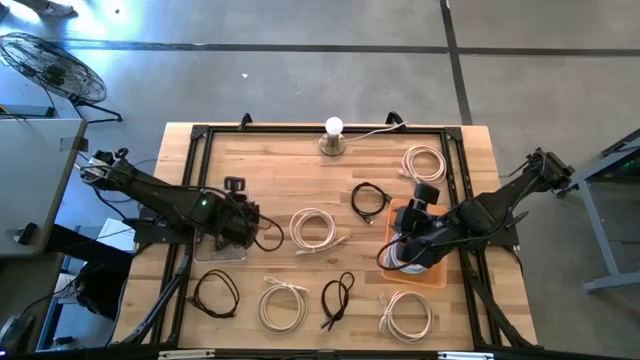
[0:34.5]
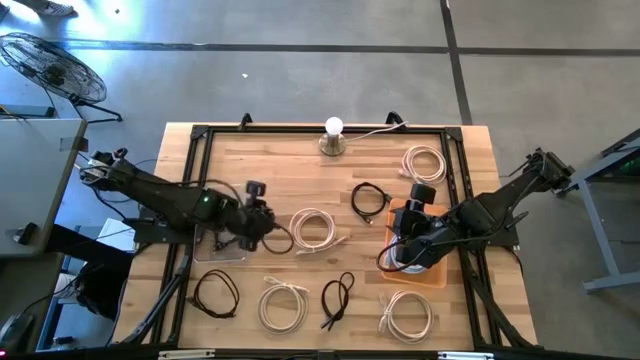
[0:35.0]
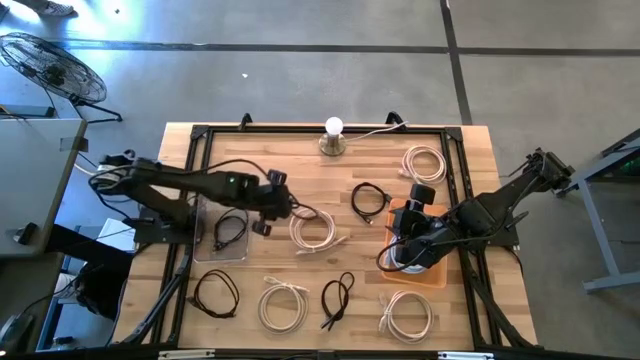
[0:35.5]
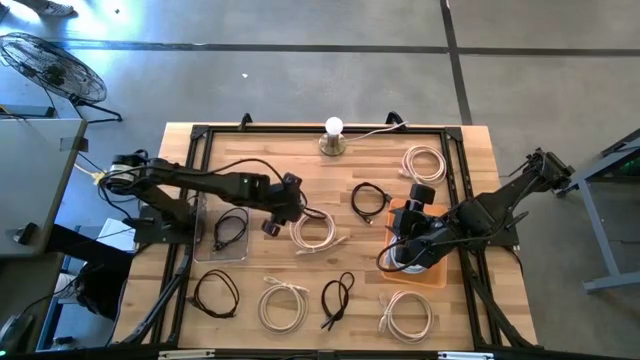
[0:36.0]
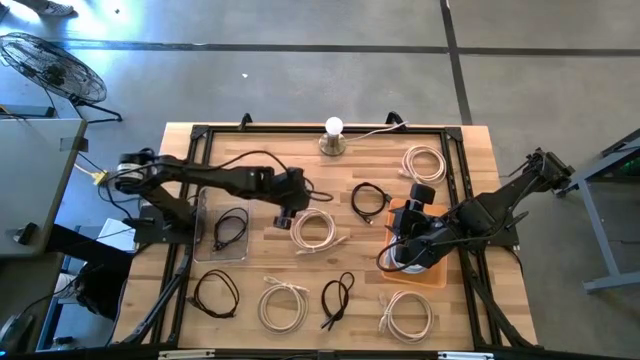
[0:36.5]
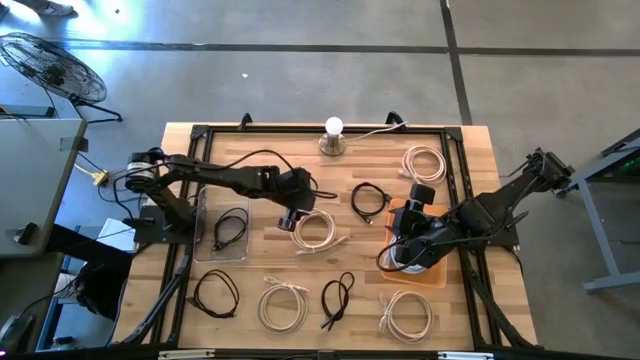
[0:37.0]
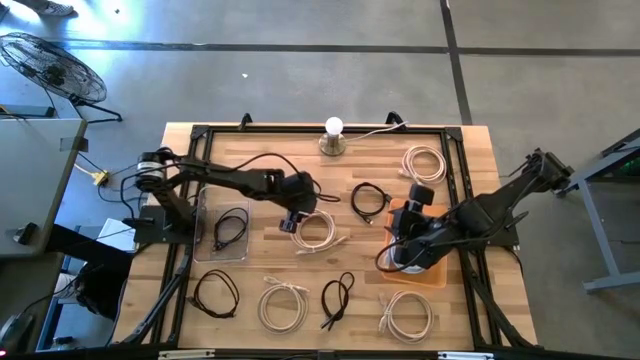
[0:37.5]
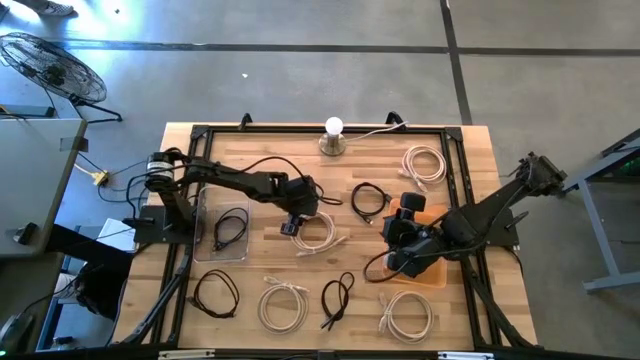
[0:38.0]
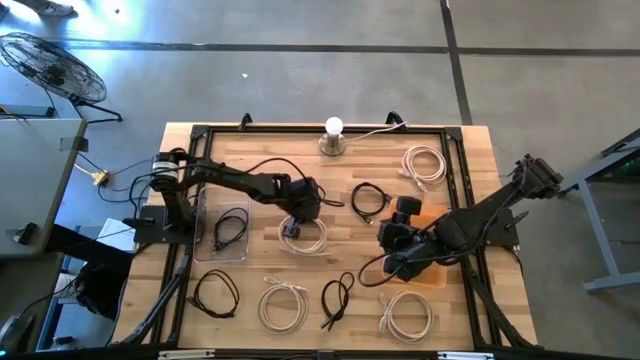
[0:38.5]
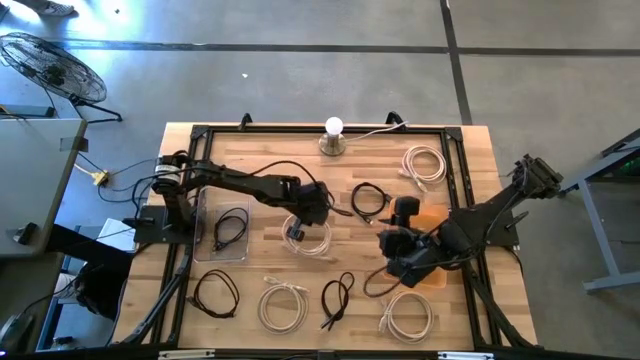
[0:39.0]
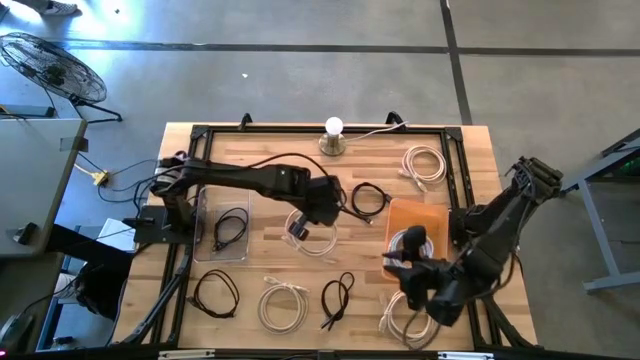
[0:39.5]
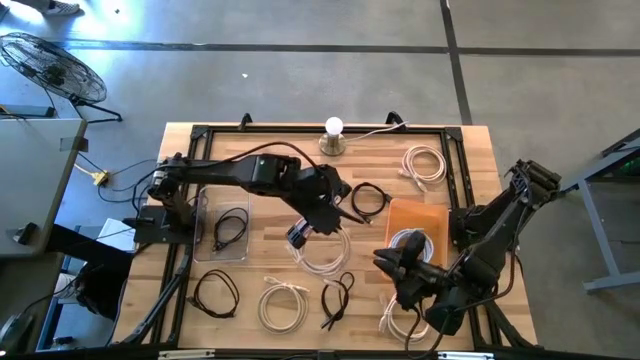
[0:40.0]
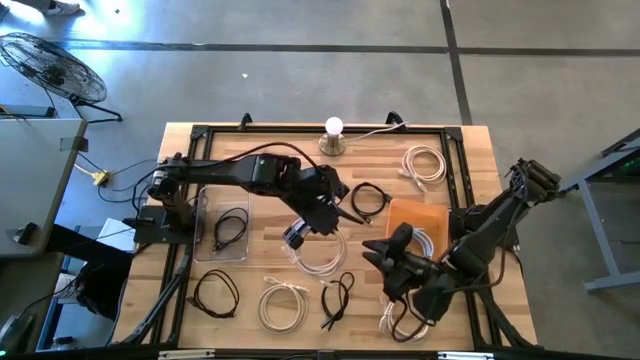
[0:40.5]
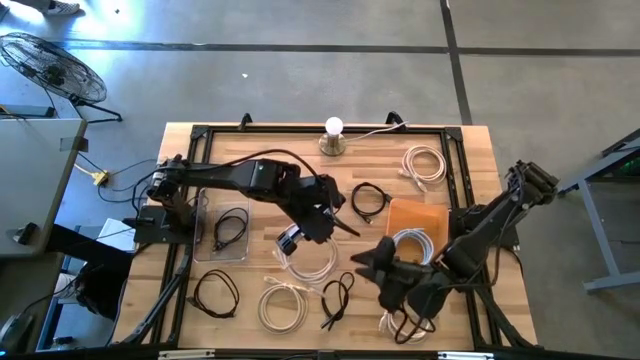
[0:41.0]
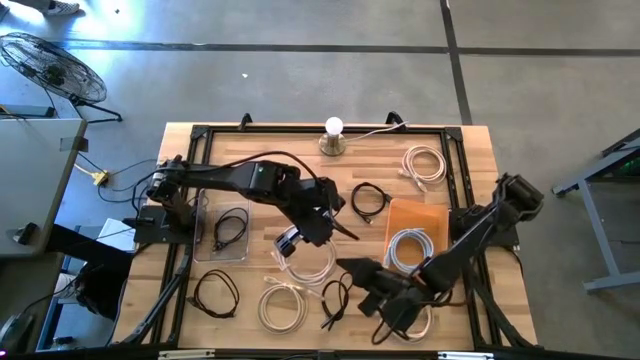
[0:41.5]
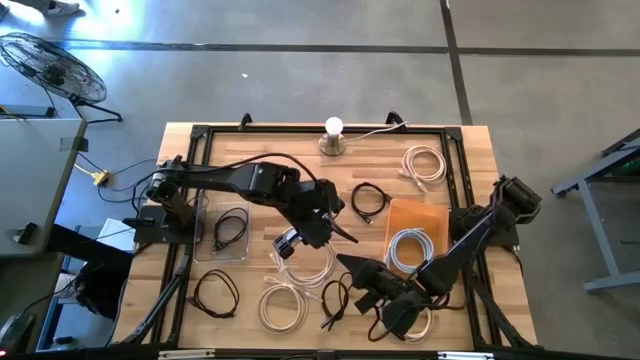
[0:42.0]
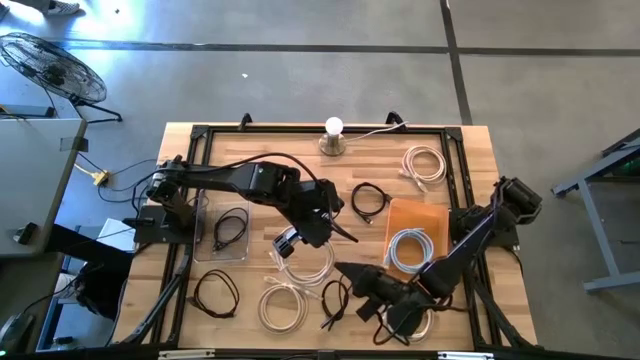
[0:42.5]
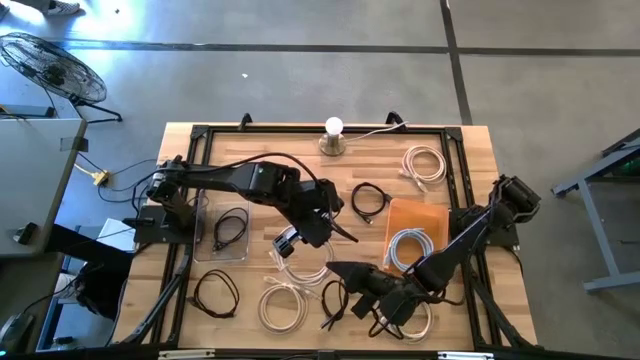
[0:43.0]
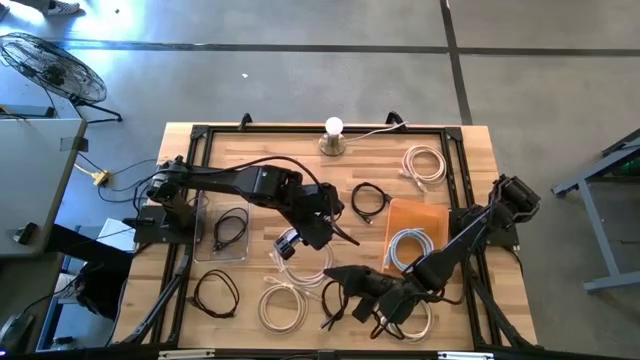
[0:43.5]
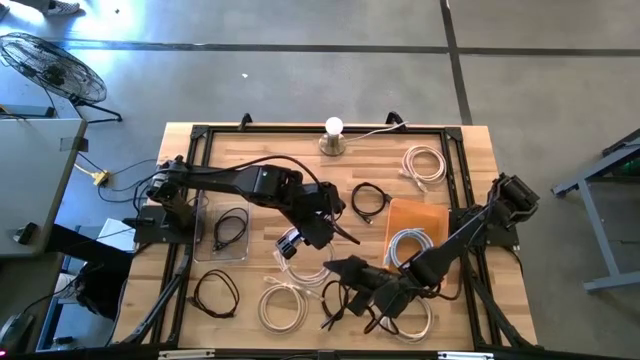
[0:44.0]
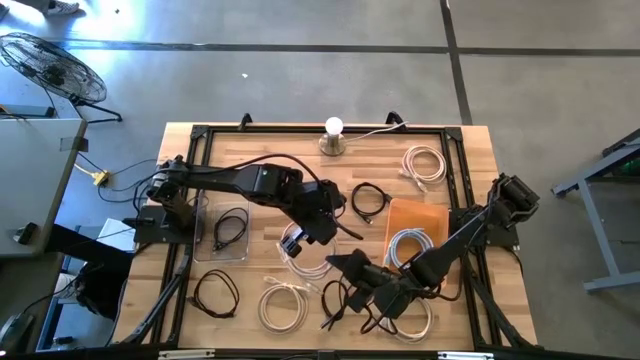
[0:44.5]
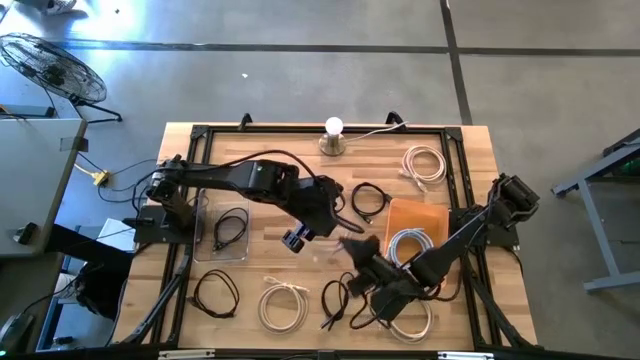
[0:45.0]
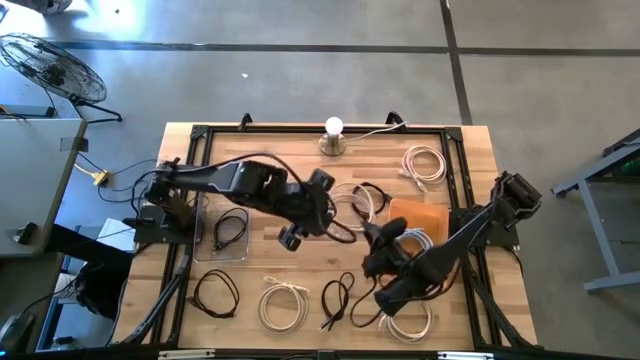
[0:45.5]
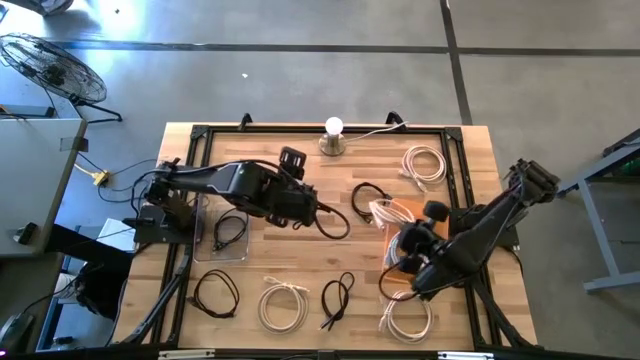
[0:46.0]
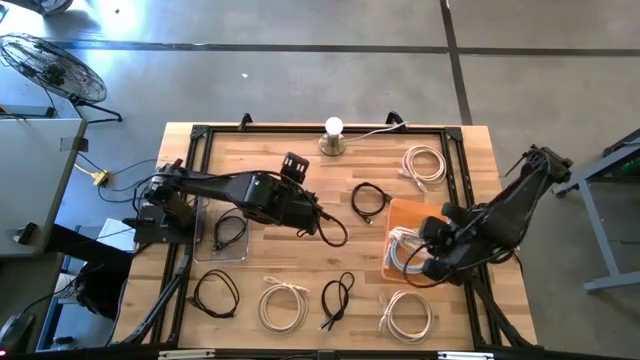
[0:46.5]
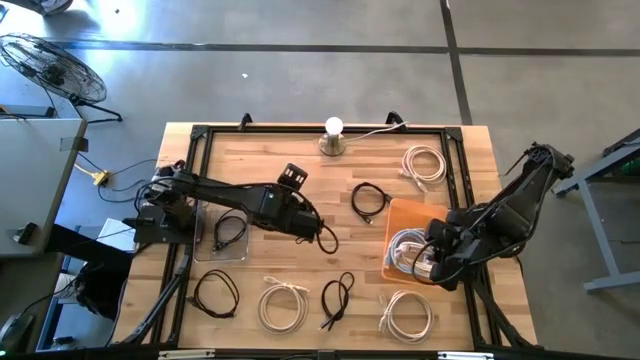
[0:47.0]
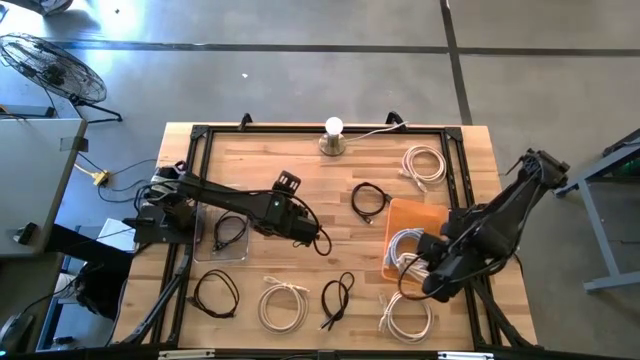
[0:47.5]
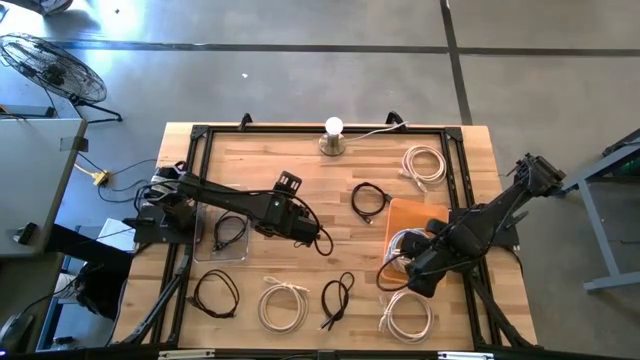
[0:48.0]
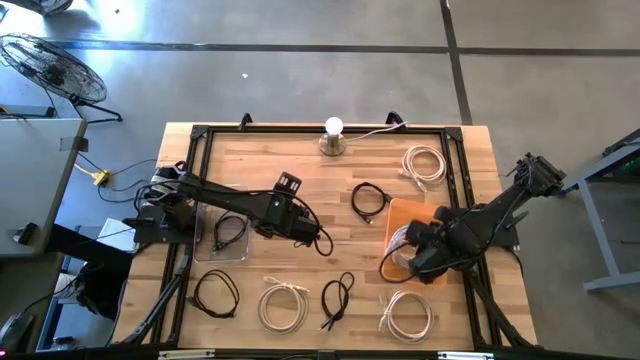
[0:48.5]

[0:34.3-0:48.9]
Task: Pick & Place USB Port
Put the brown HDMI cable into the orange bin

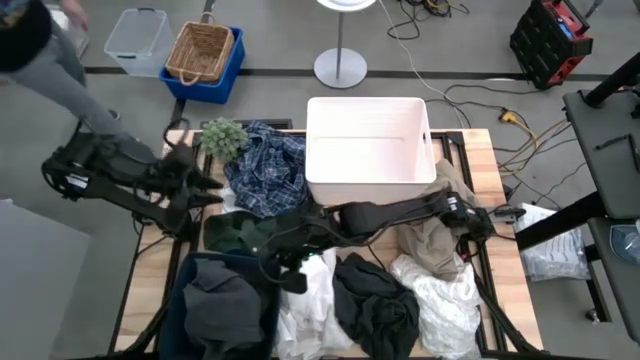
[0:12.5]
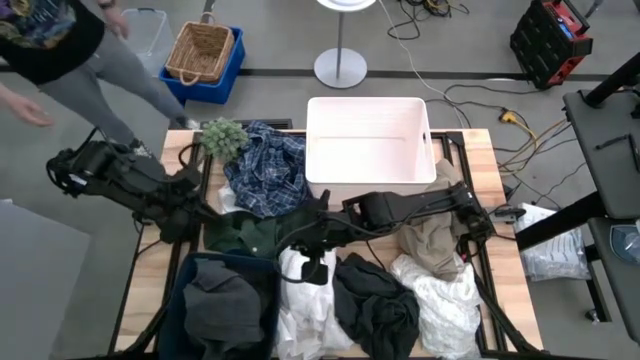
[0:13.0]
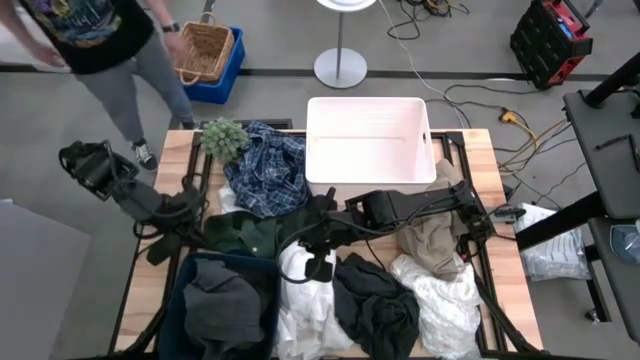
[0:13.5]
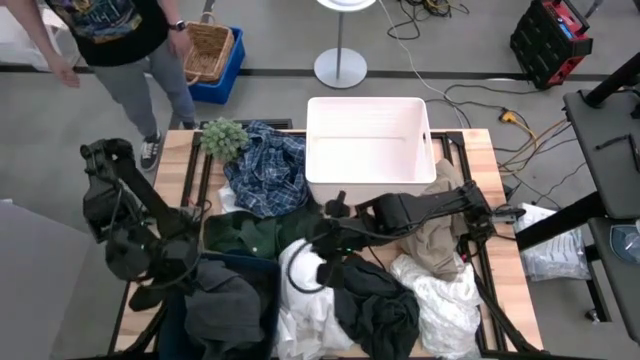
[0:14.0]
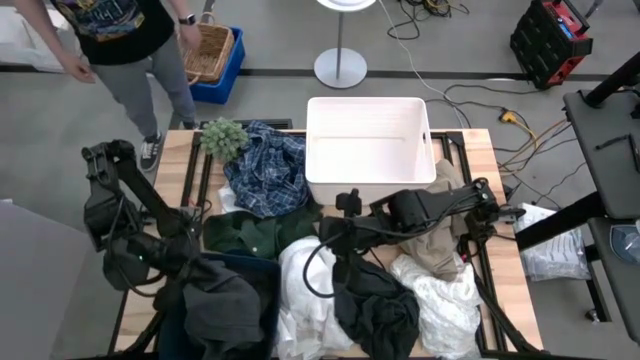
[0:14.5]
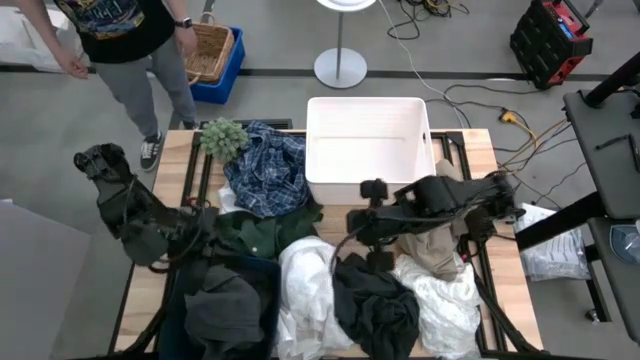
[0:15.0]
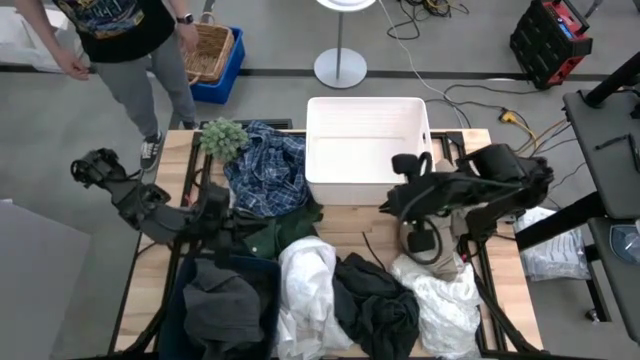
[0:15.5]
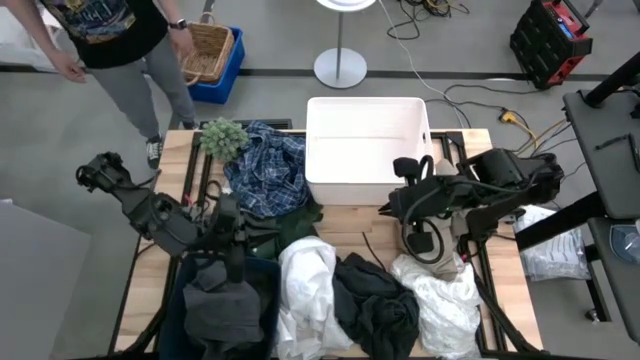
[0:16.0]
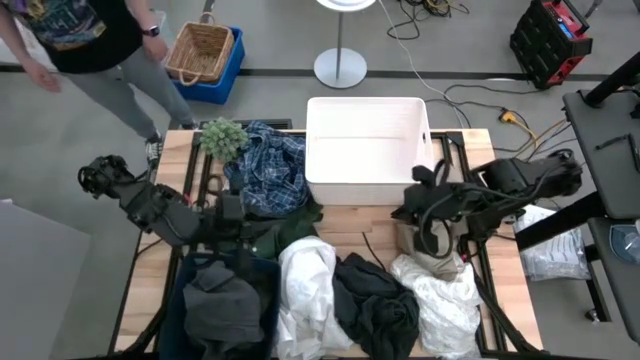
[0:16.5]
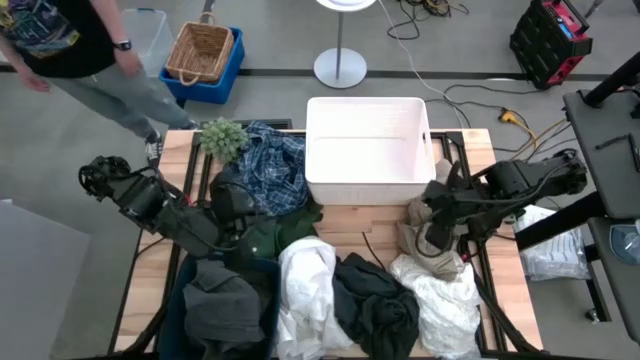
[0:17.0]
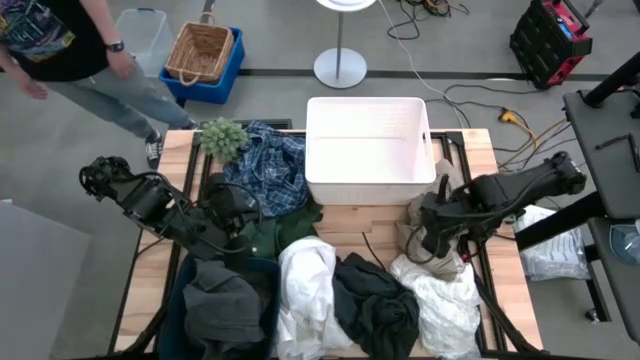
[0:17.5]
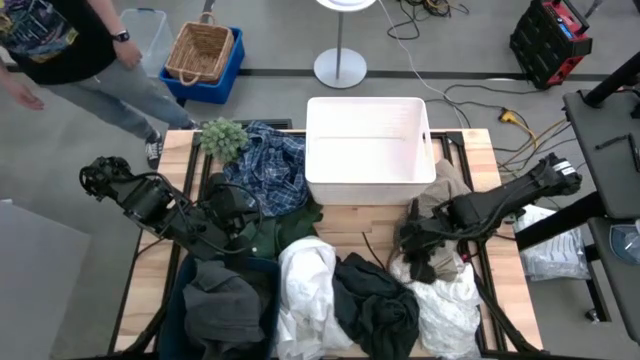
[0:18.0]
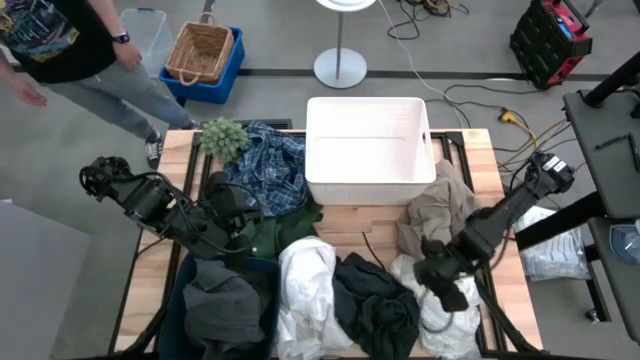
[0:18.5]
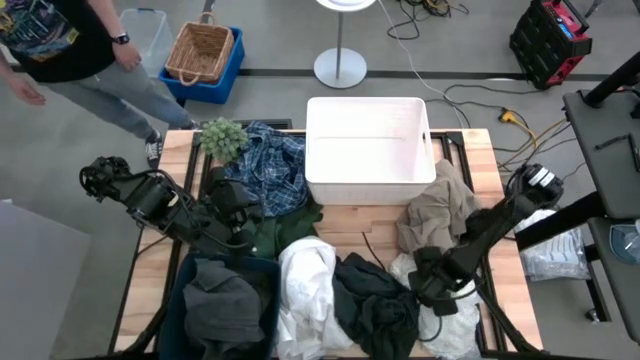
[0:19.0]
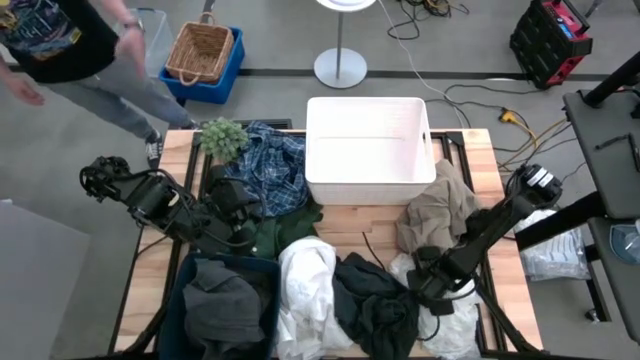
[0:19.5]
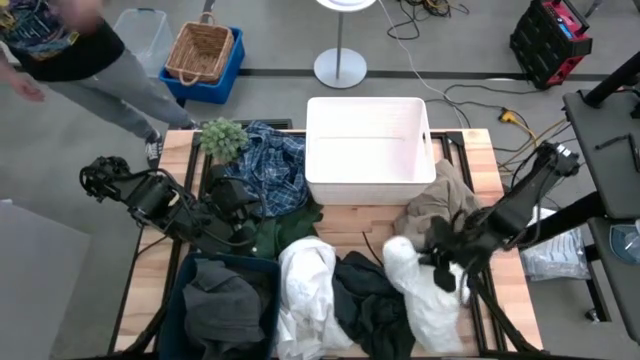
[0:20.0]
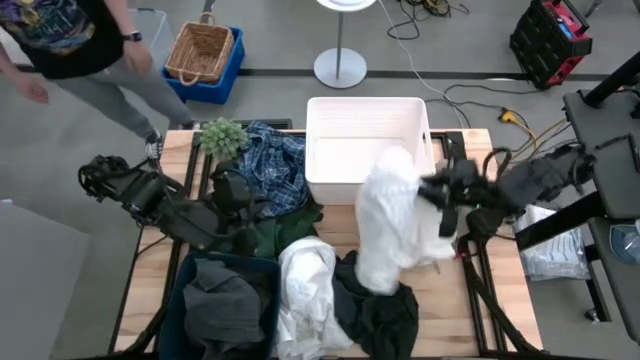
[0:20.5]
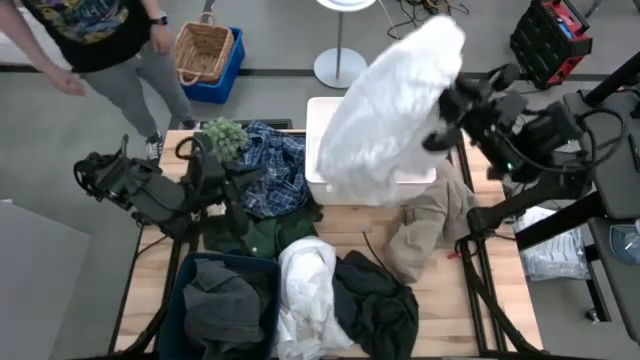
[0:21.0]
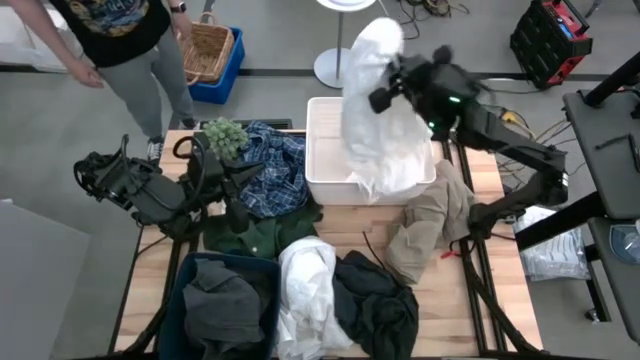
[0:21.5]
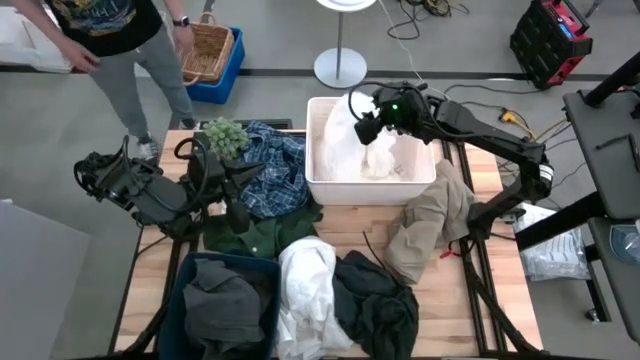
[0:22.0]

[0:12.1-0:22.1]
Task: Sort clothes
Put the right white shirt in the white bin
